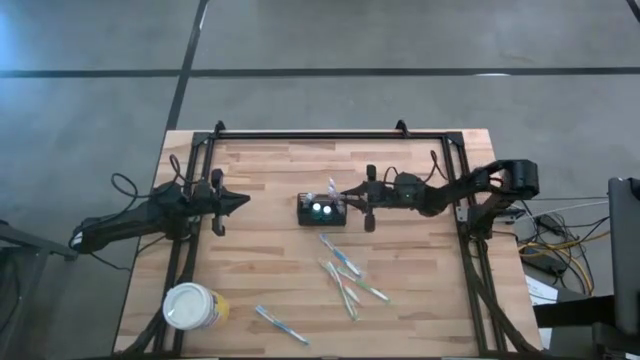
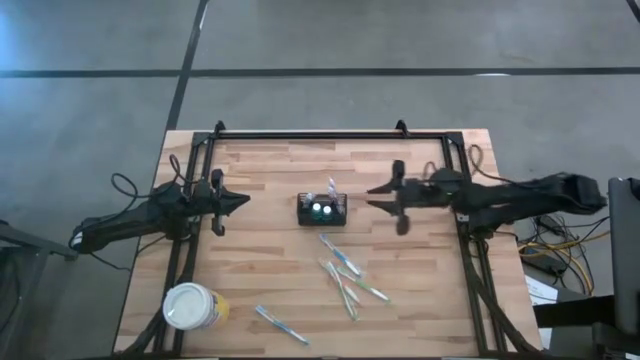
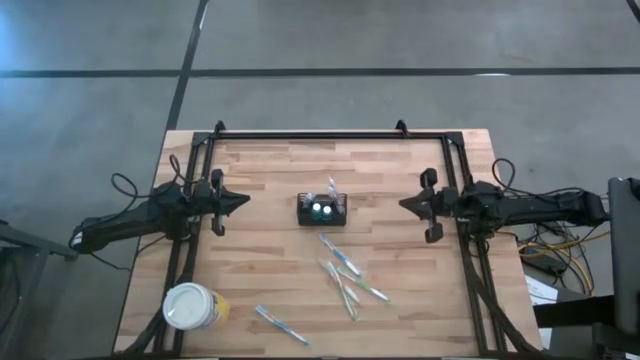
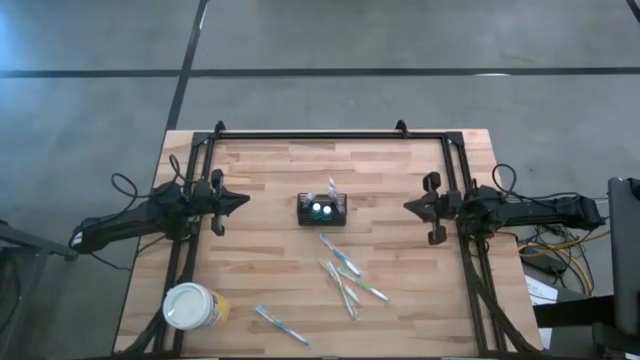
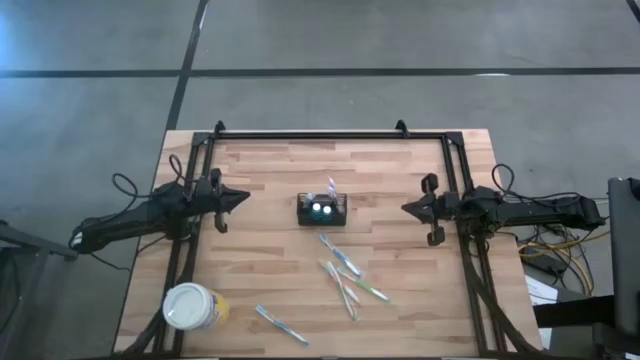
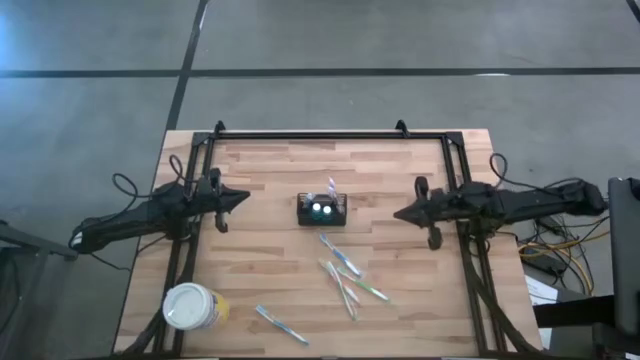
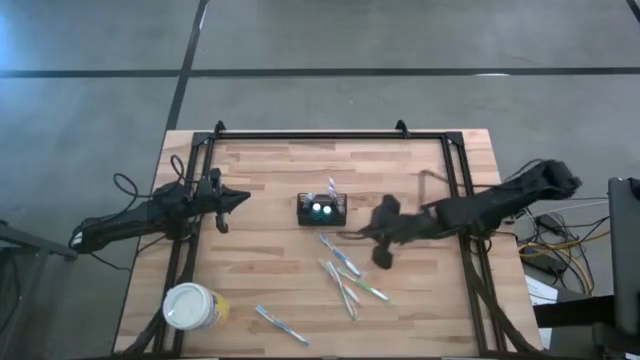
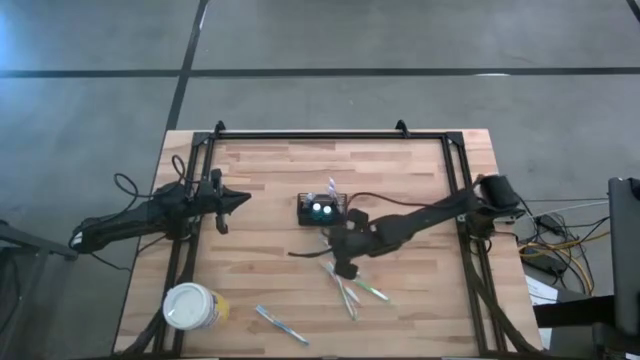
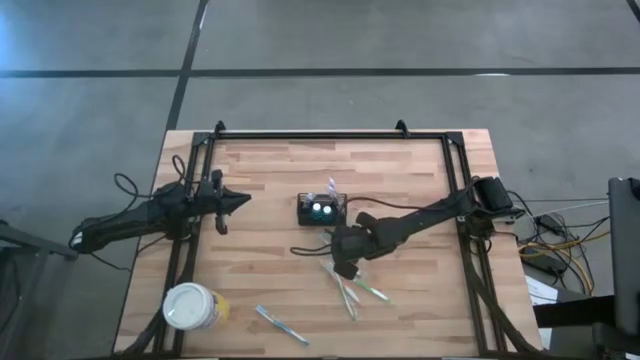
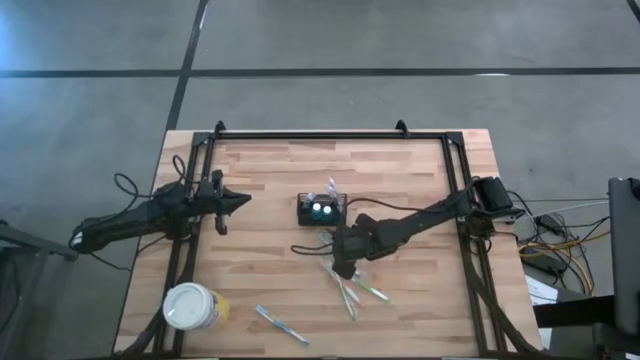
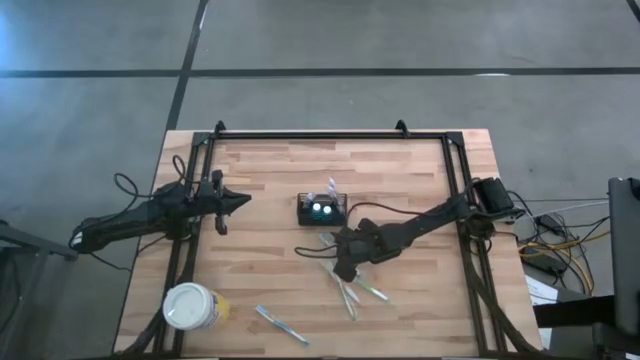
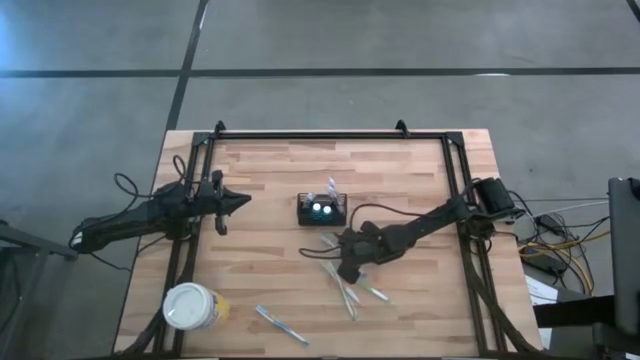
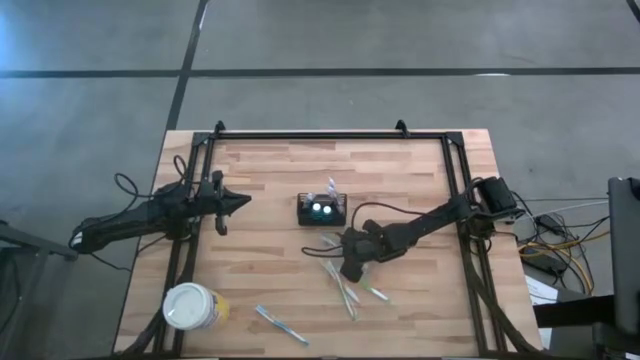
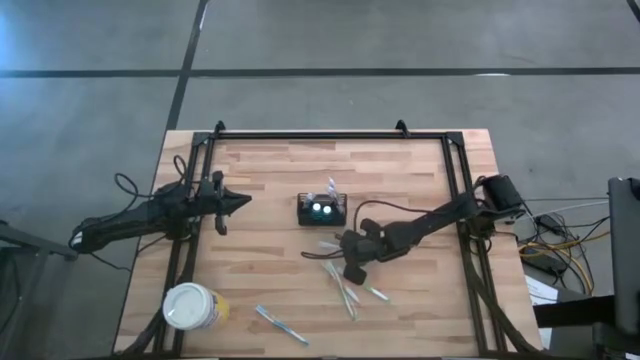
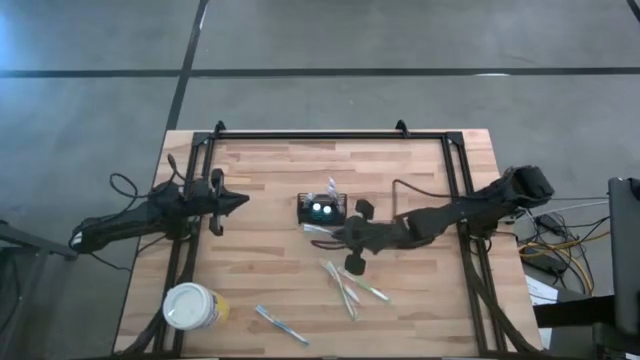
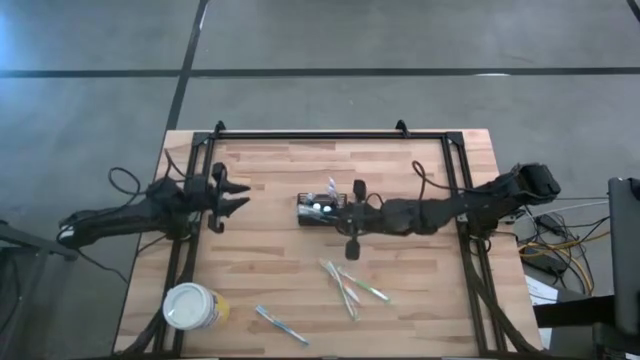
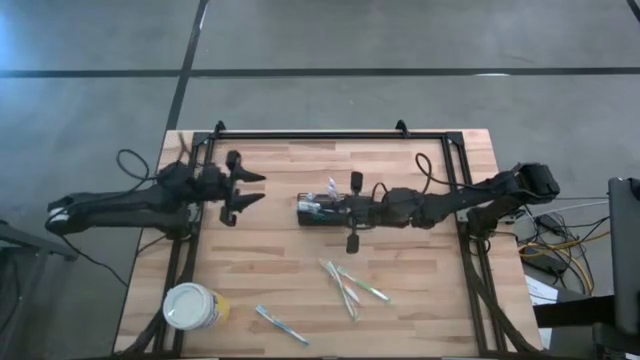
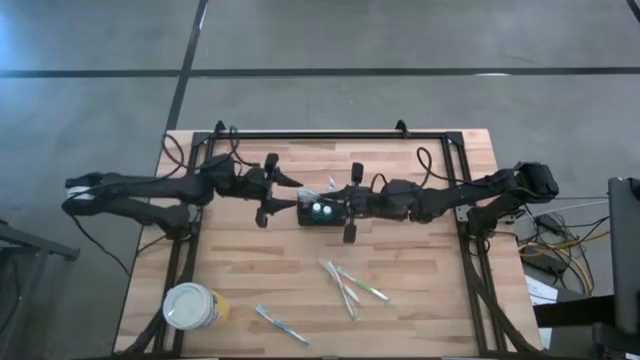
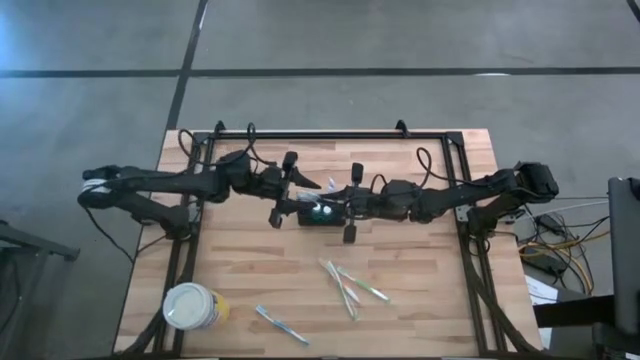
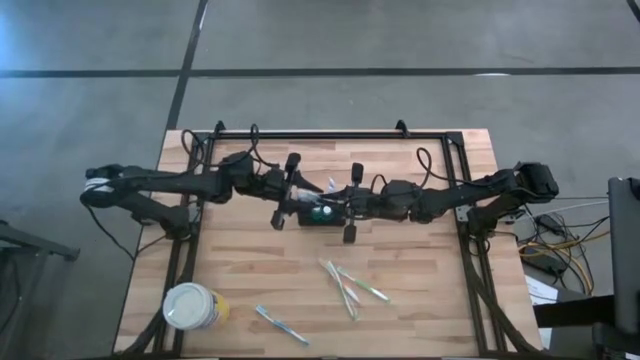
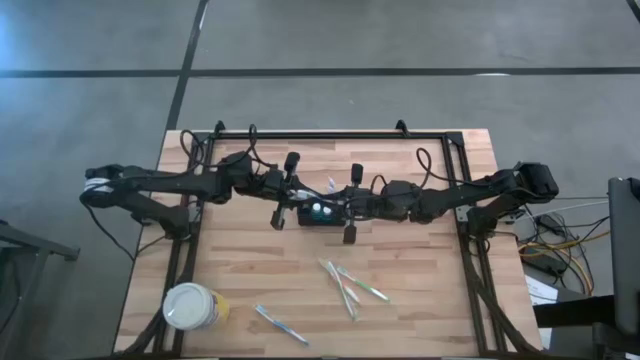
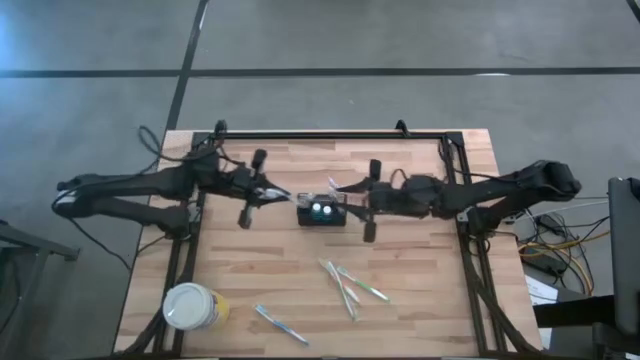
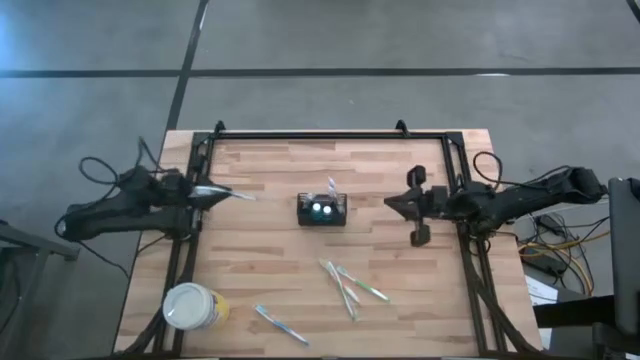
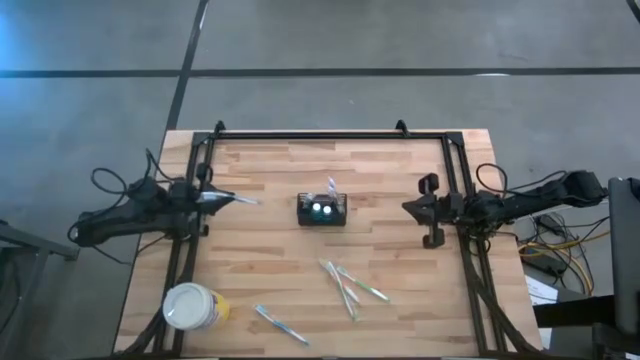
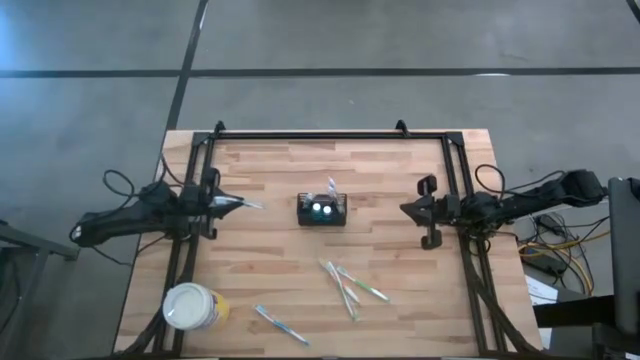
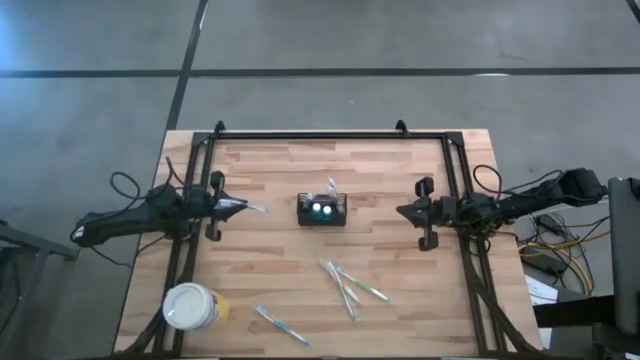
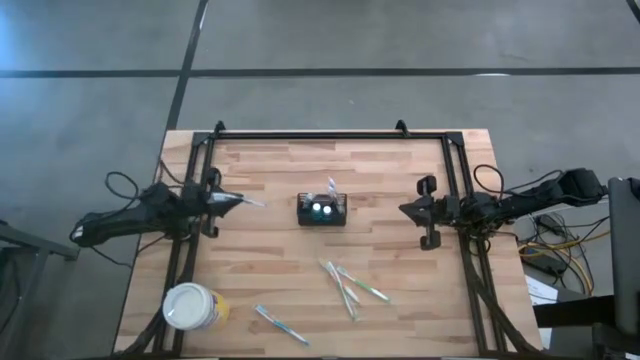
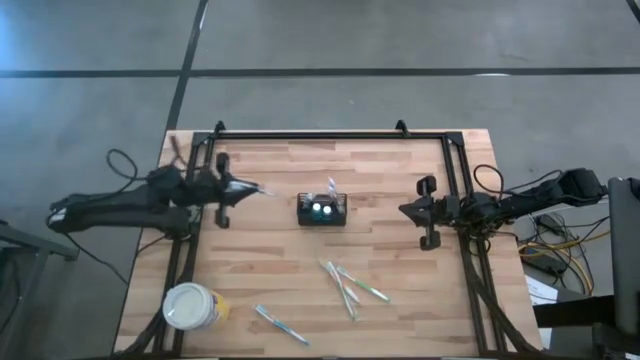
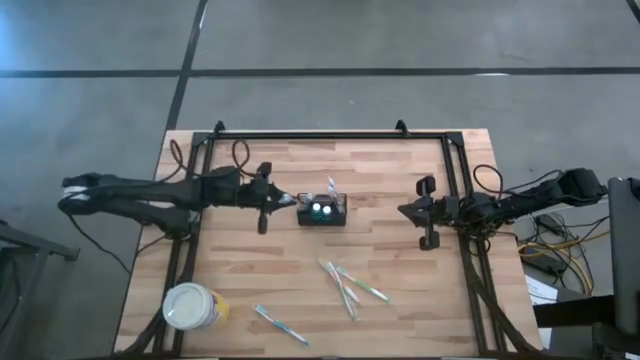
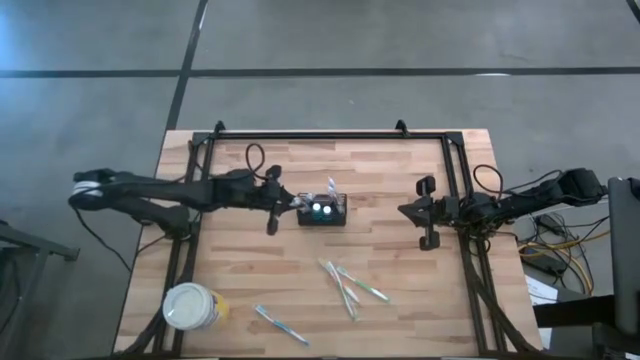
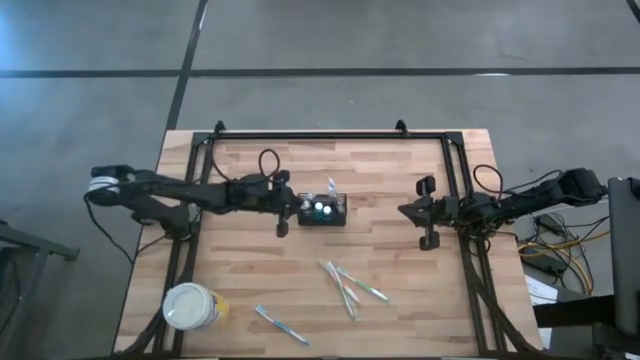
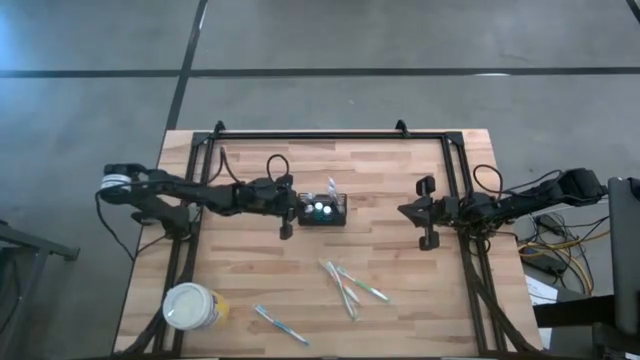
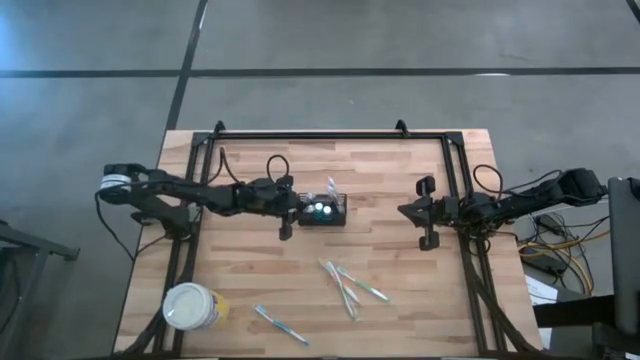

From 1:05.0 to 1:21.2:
Task: Pick & Place toothbrushing station
Put the blue toothbrush into the black wire organizer

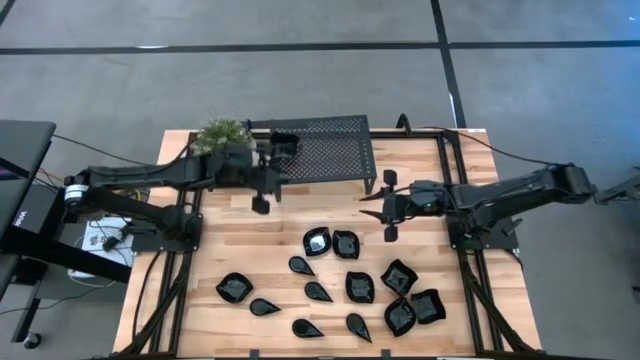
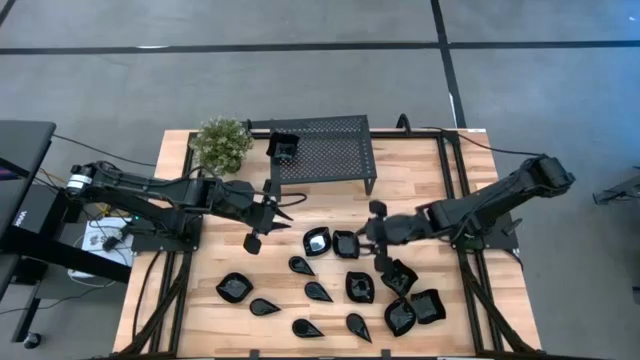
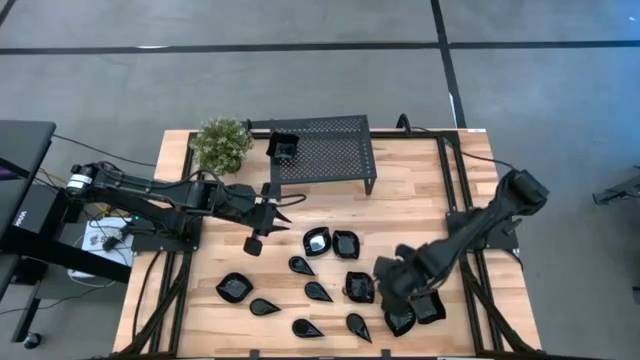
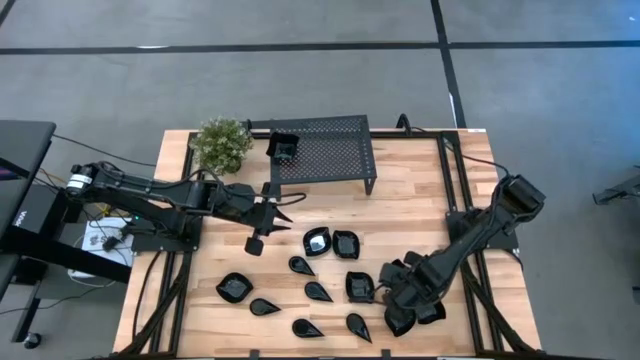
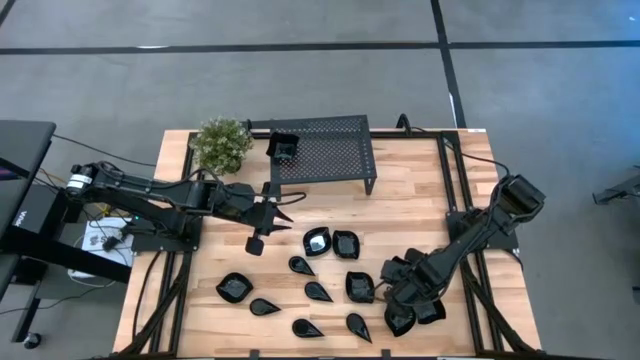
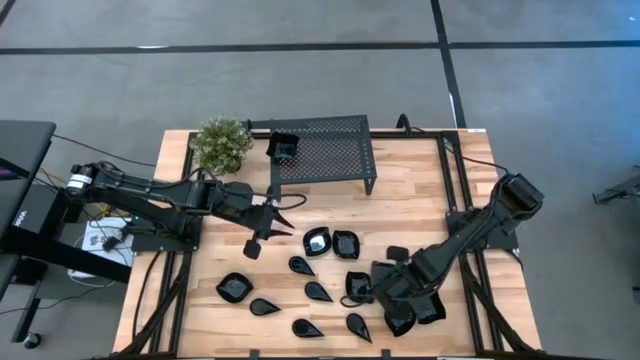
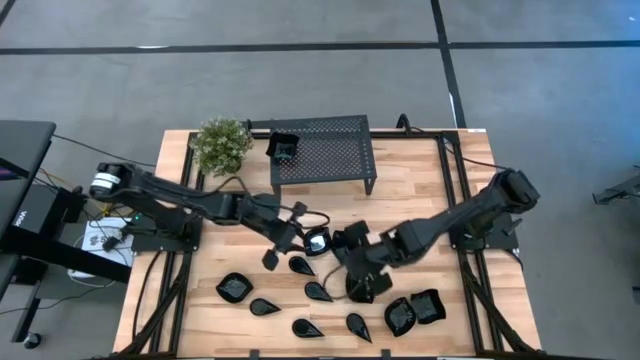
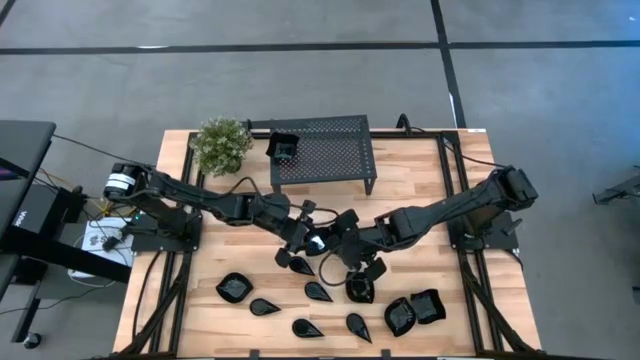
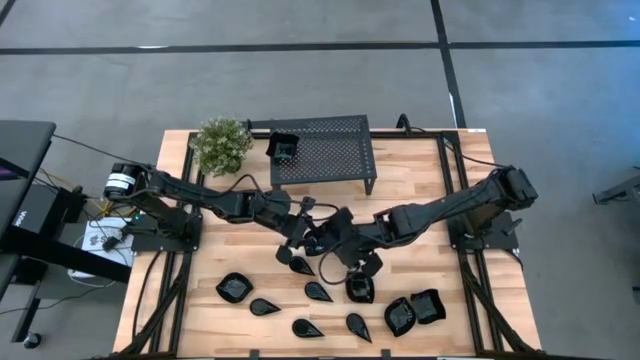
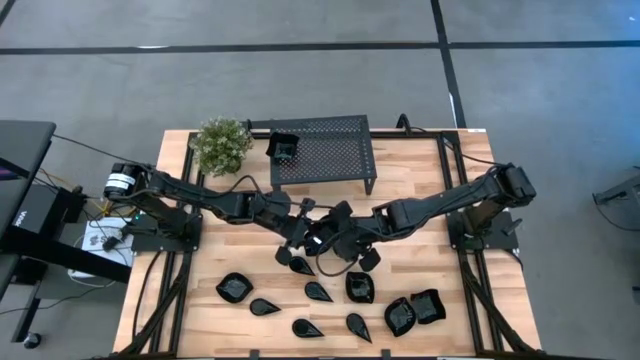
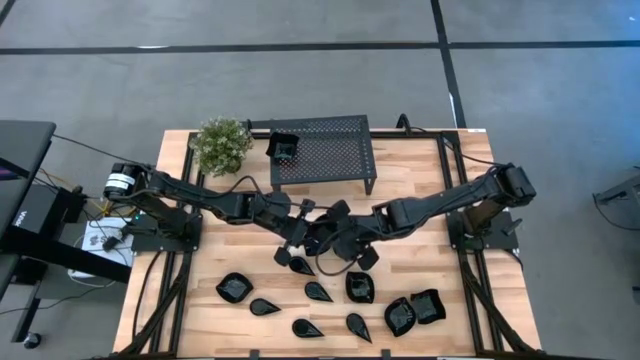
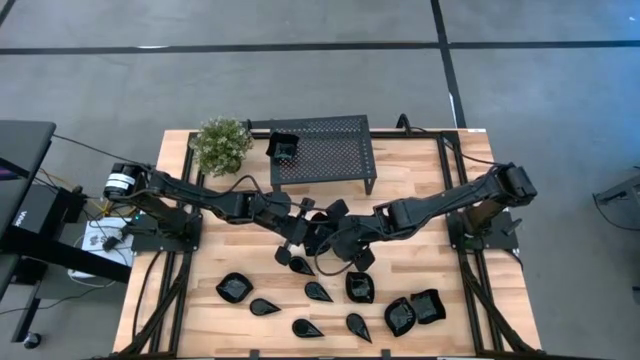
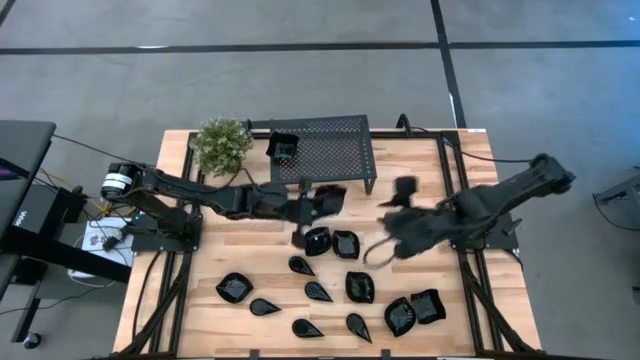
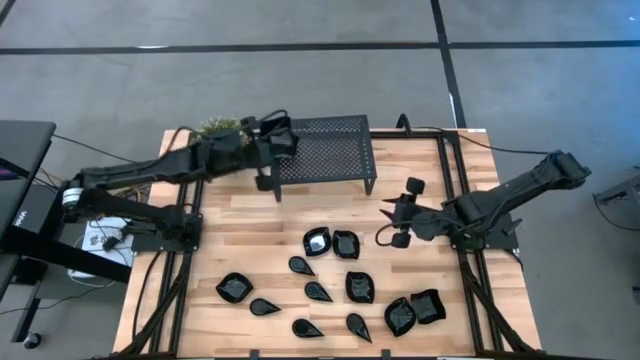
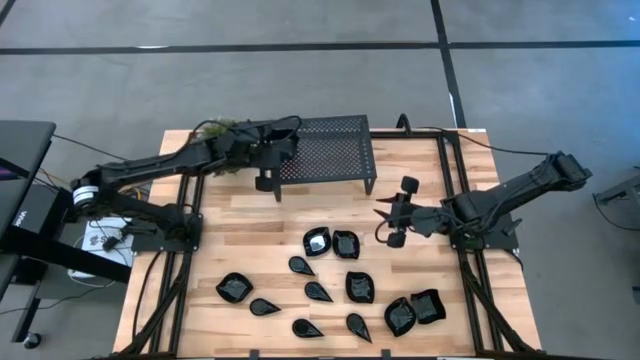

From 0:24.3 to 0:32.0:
Task: Pick & Place Mini shaped plates
Stack the distorted square plate on top of the distorted square plates on the shelf
